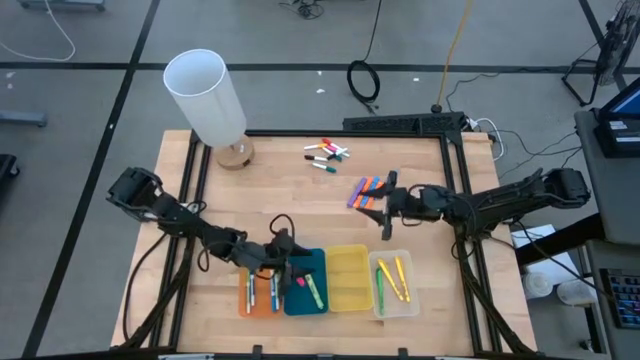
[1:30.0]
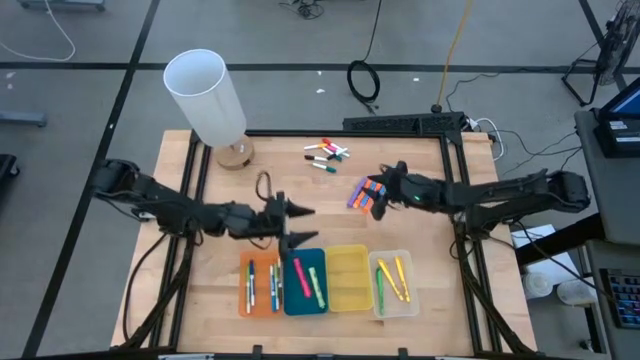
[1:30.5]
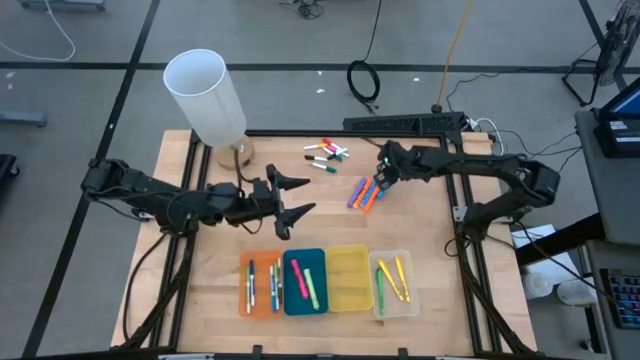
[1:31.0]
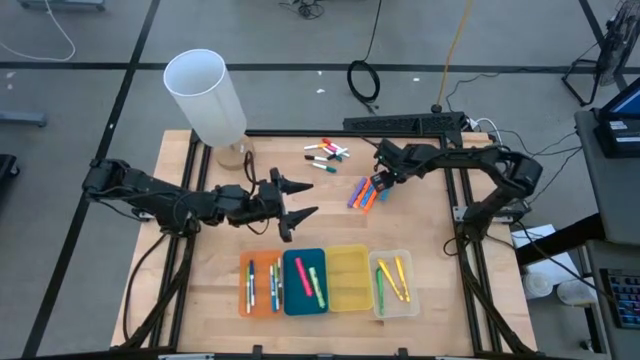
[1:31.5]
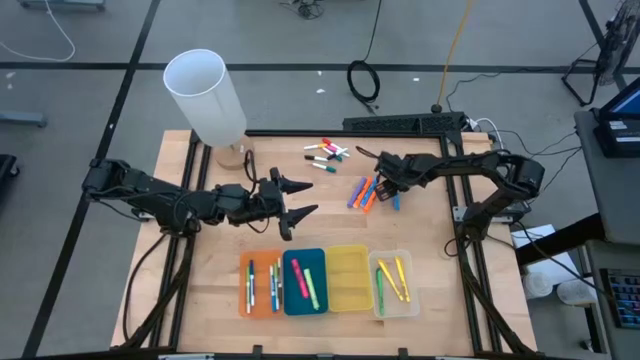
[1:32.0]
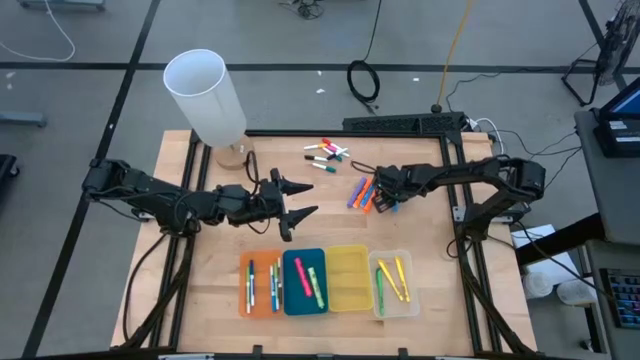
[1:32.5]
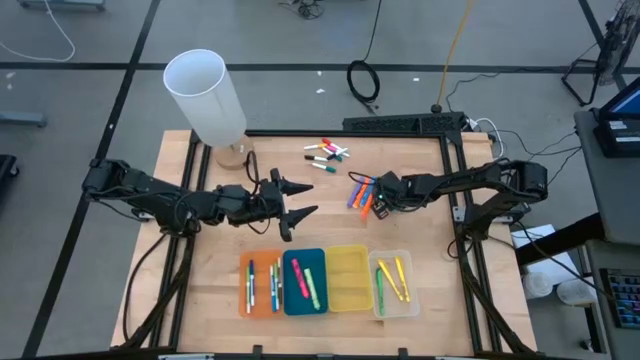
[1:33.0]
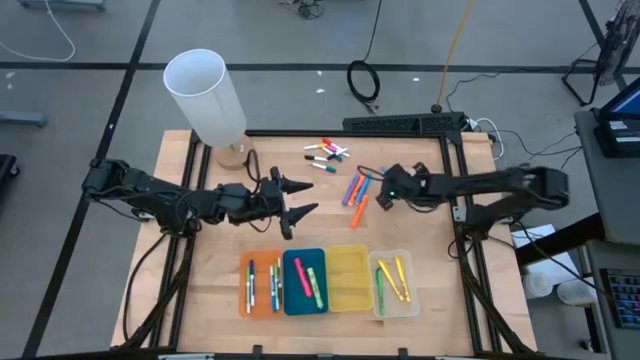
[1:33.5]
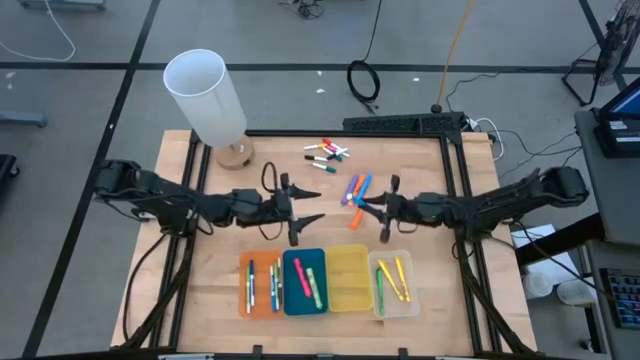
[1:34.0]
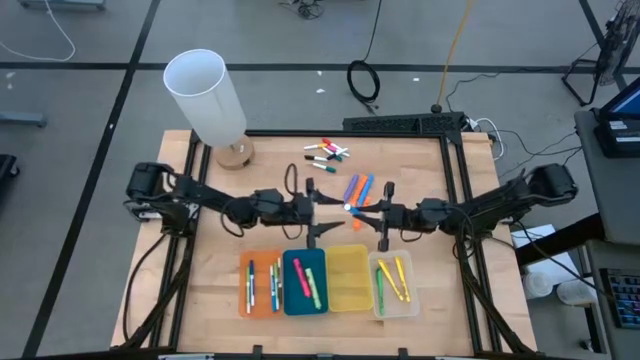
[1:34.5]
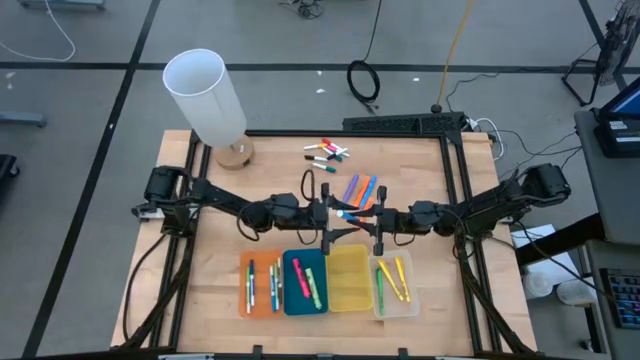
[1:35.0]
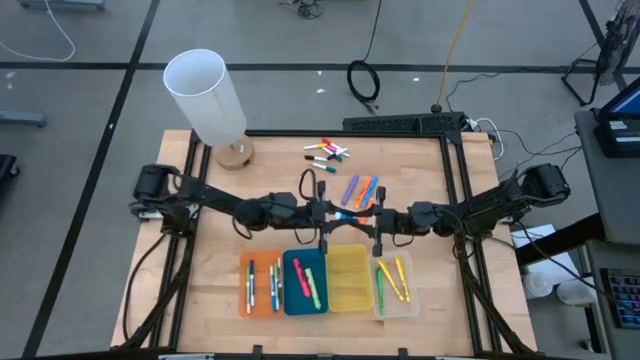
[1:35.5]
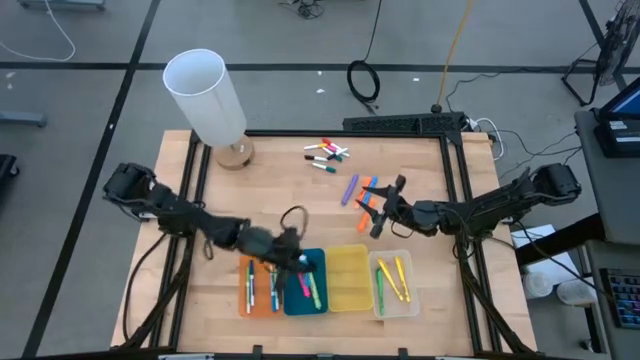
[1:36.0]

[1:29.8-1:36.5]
Task: Pick & Place Markers
Put the right blue highlighter pen into the blue bin

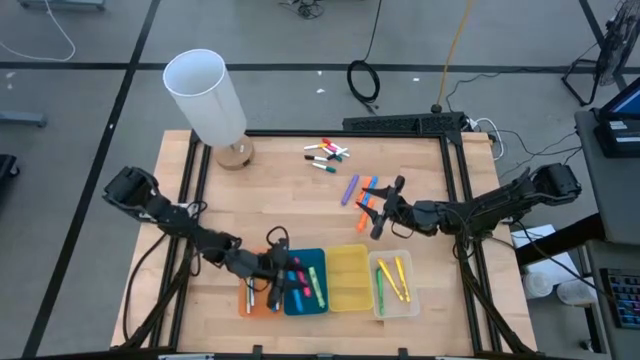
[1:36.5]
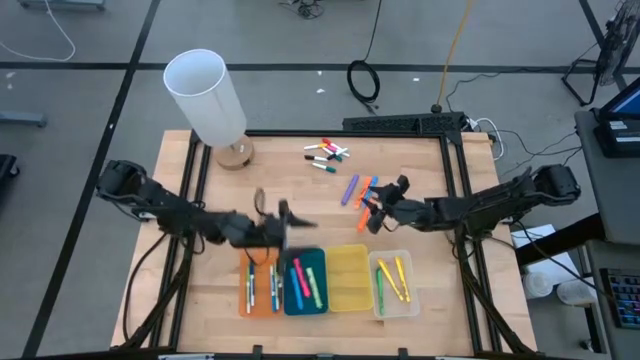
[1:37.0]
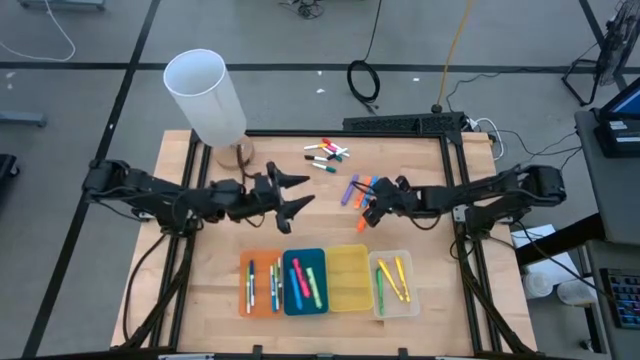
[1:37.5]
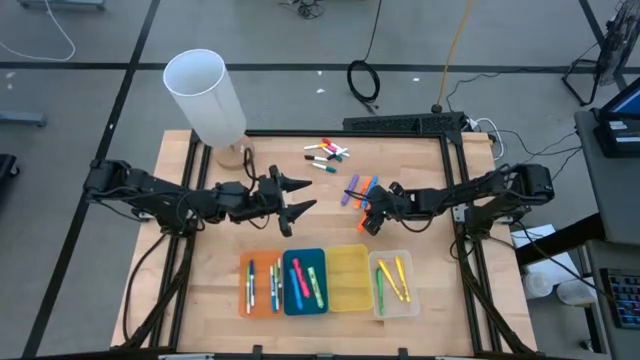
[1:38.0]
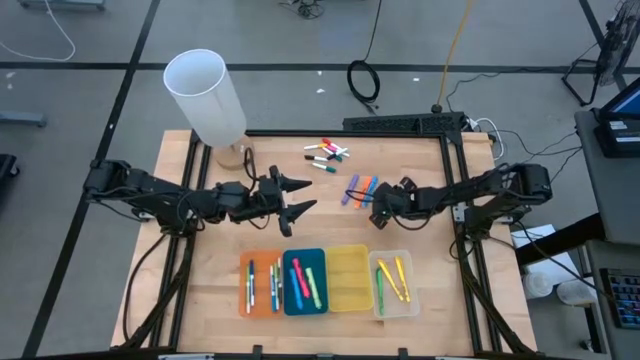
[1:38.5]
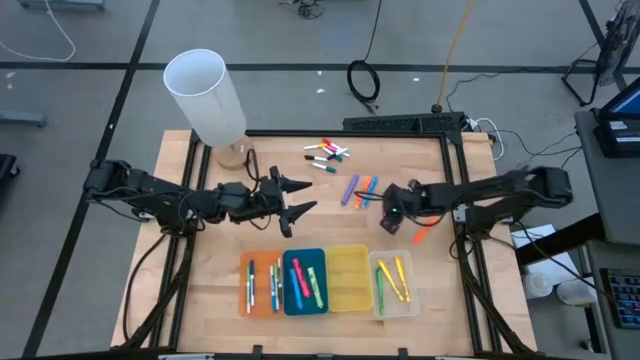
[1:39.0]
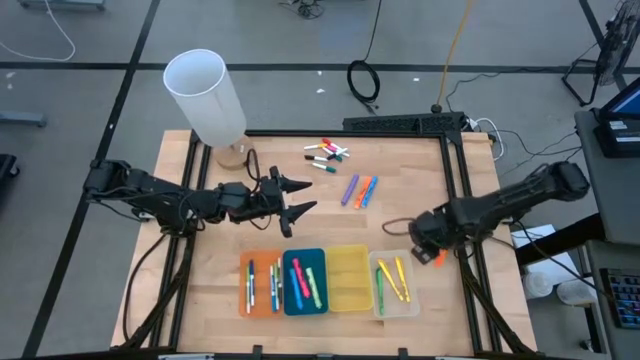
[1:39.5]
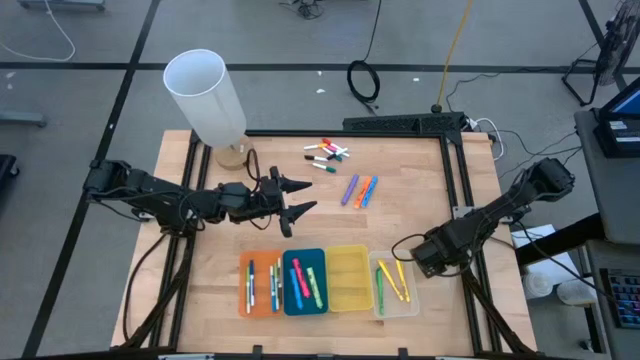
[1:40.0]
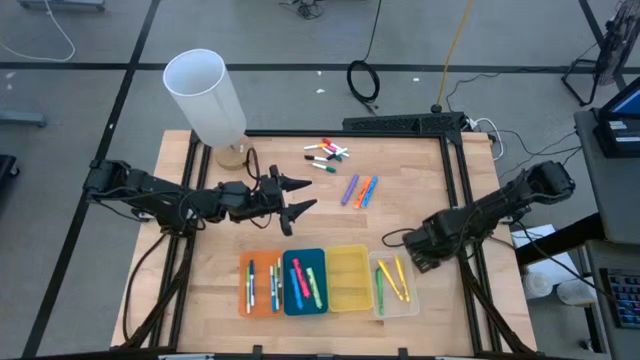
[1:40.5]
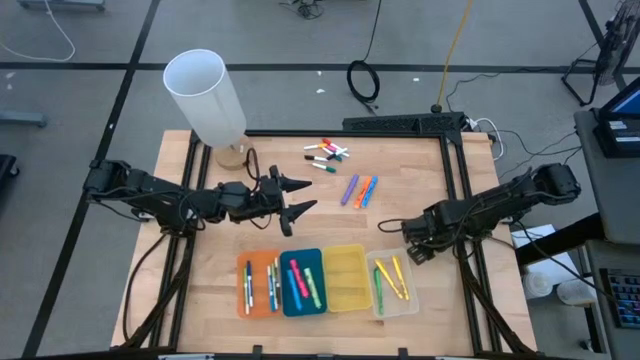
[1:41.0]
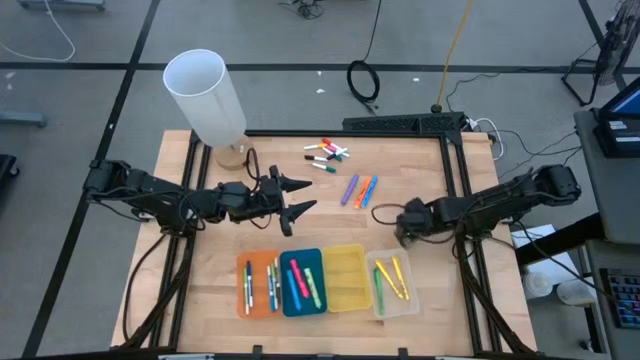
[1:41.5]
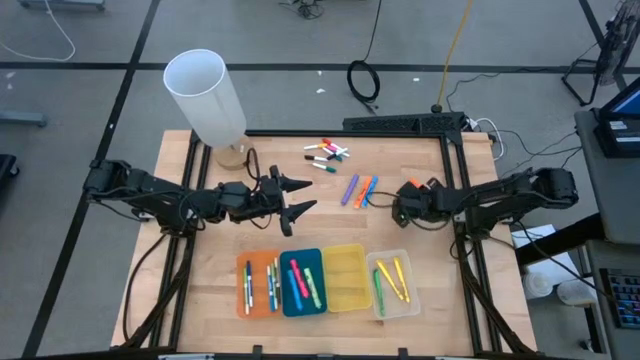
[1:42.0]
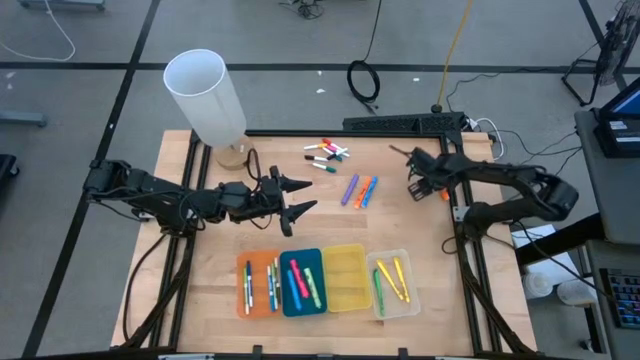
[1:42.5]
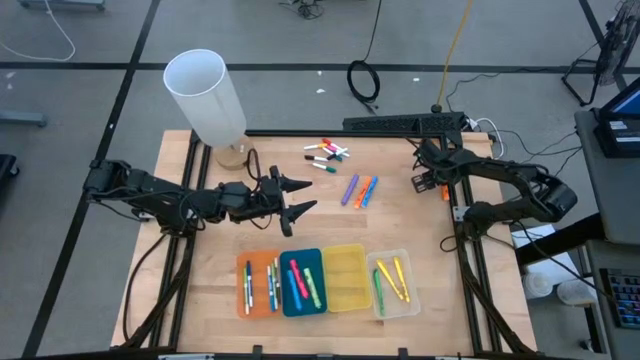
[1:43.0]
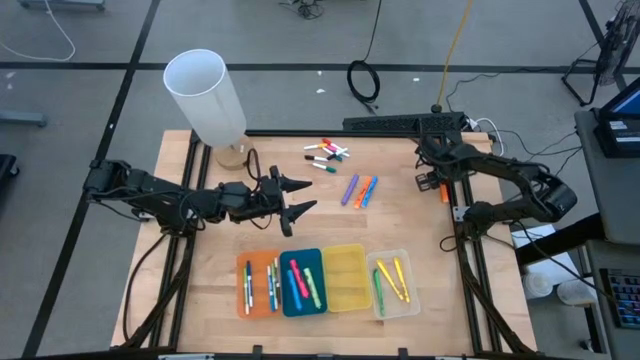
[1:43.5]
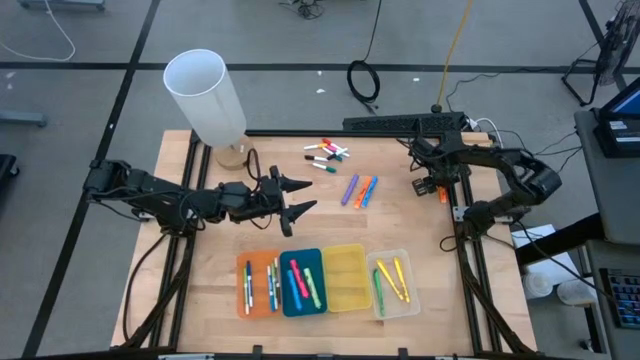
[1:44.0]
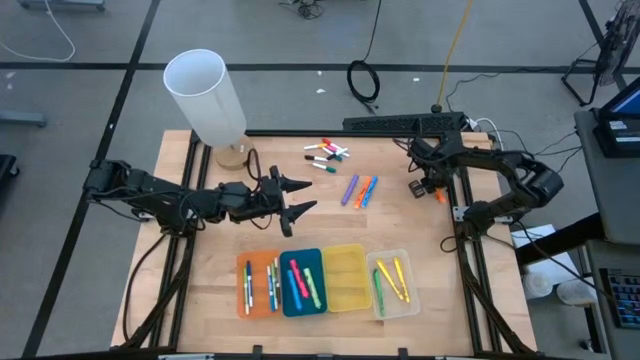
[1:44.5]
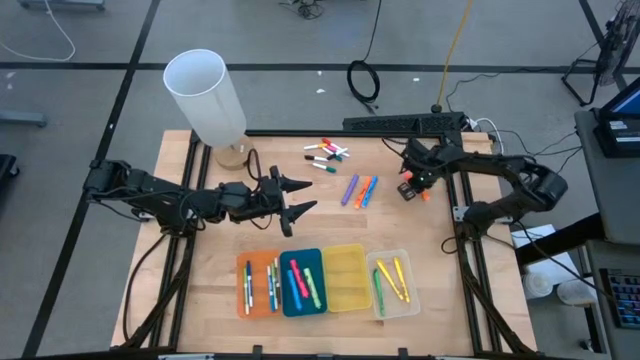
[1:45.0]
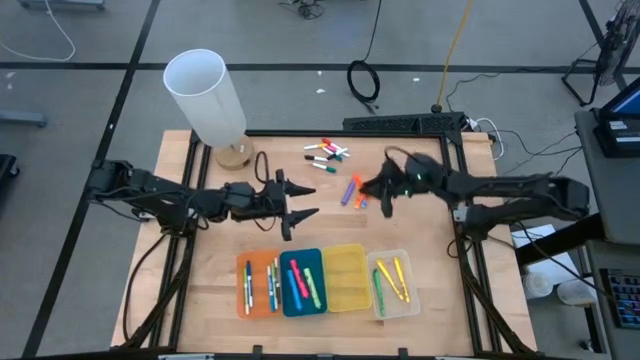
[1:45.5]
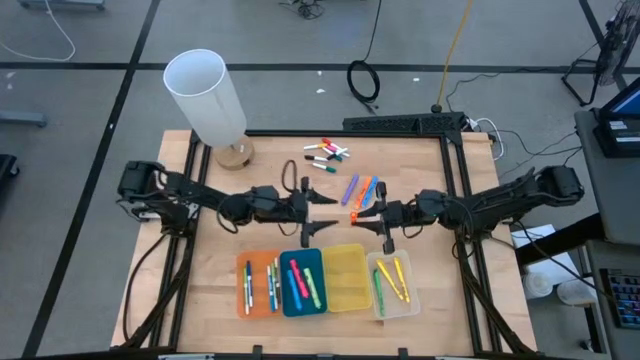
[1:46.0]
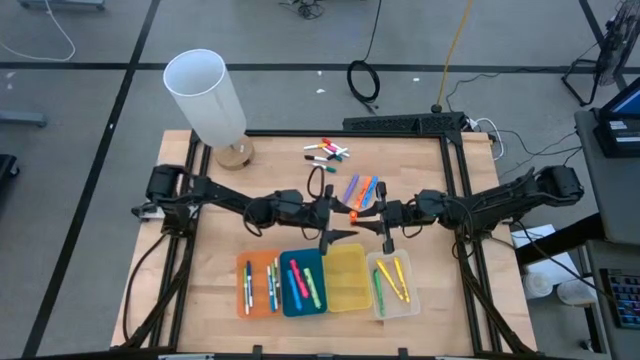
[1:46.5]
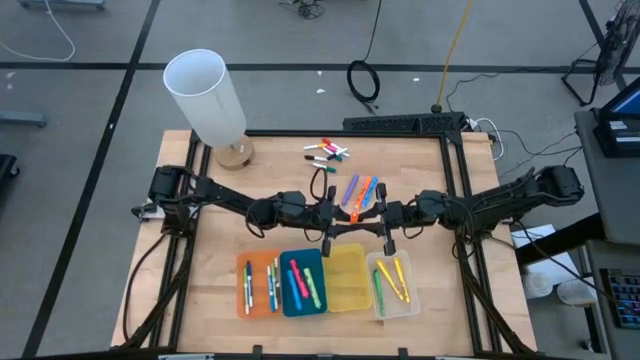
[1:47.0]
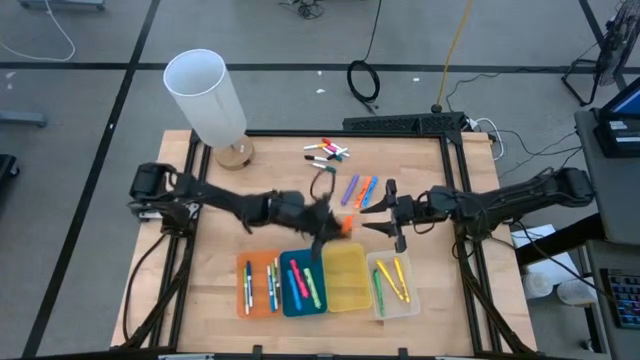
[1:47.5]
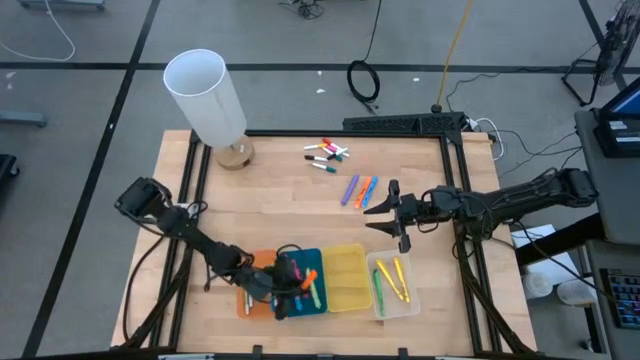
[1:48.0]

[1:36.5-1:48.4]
Put the right orange highlighter pen into the blue bin

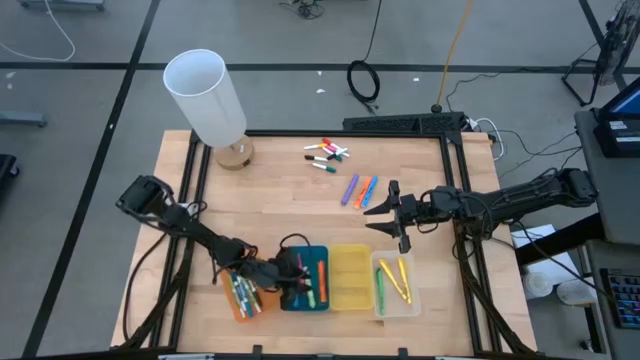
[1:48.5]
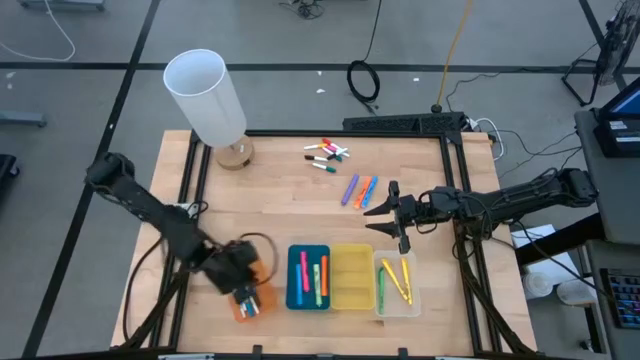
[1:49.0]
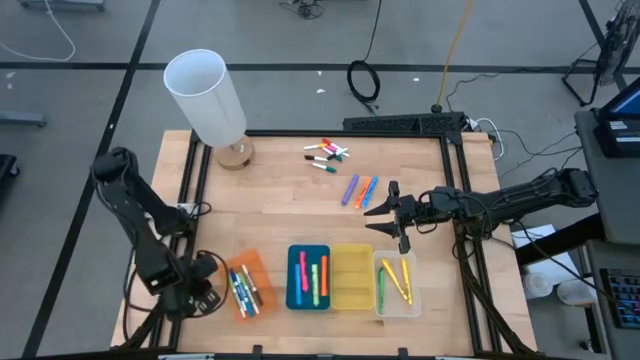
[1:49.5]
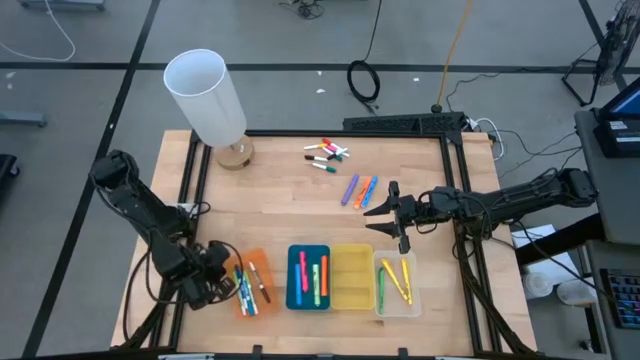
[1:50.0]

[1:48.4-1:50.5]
Adjust the orange bin on the table

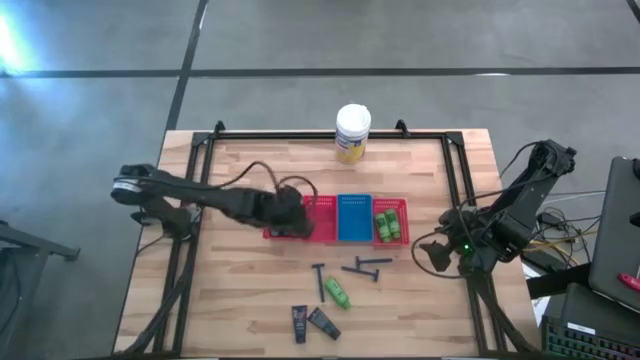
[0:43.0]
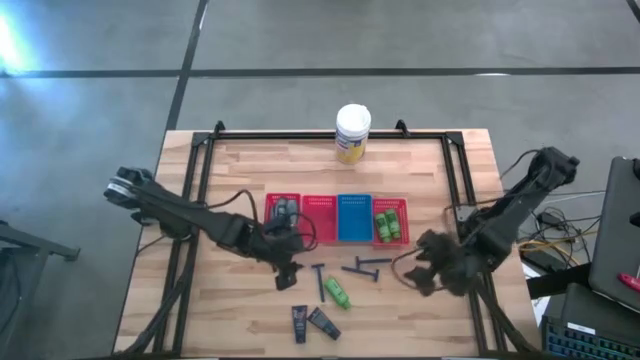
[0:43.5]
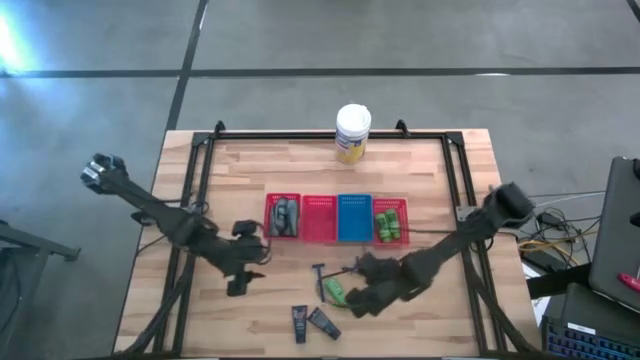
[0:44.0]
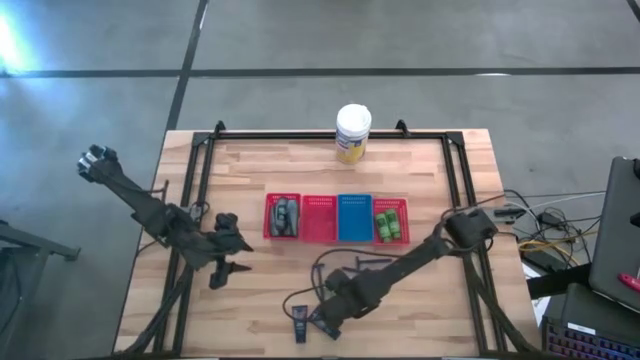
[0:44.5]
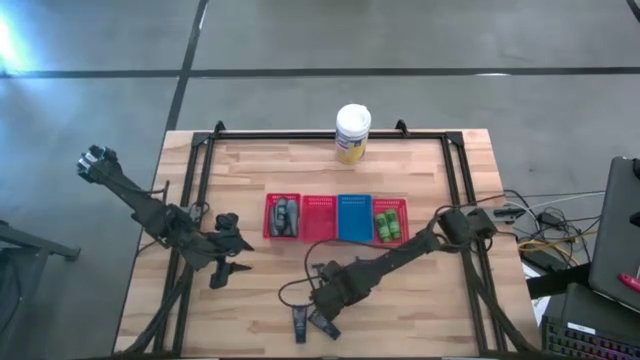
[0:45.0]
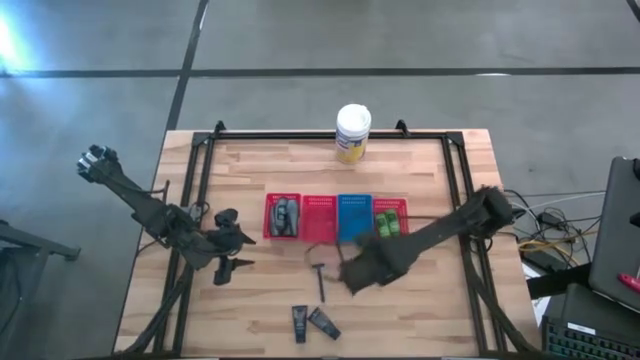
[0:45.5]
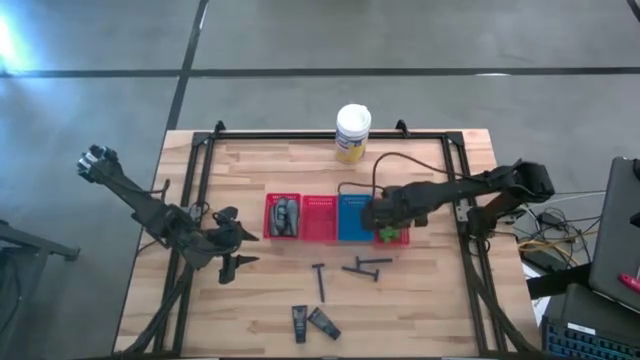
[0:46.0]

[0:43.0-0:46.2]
Task: Pick & Place Travel size toiletries
Put the green shampoo into the right red bin
